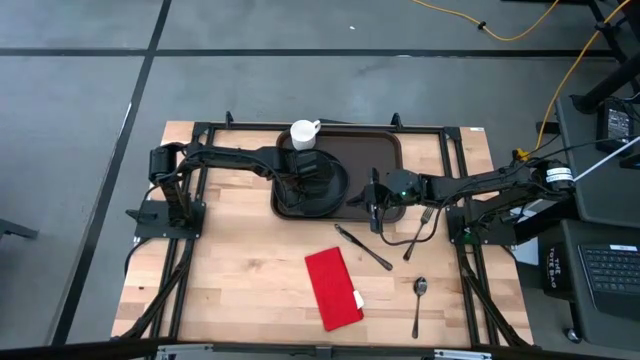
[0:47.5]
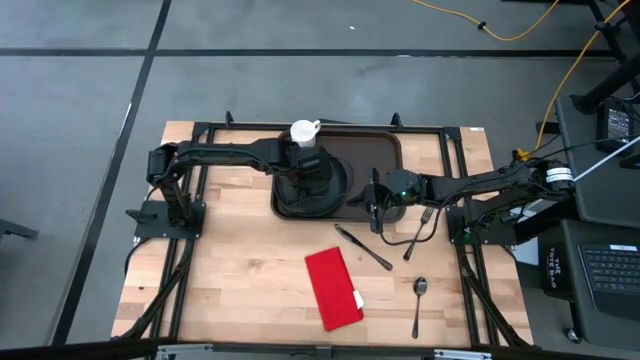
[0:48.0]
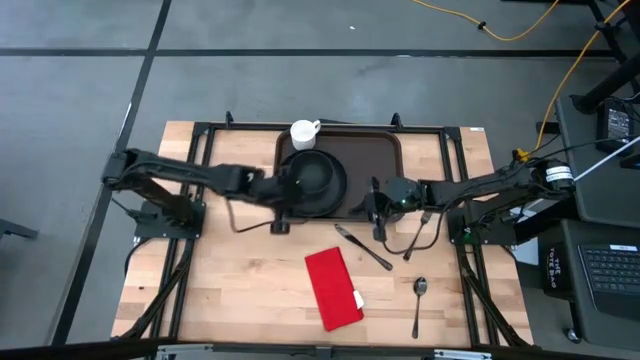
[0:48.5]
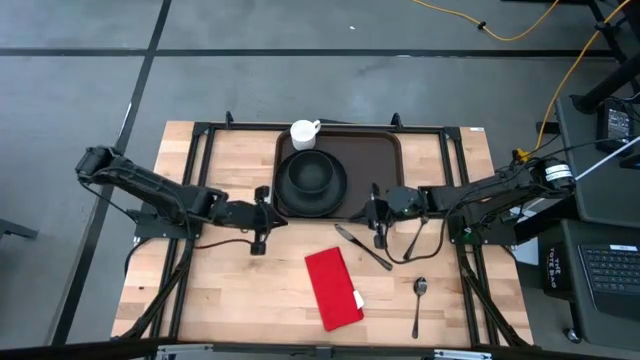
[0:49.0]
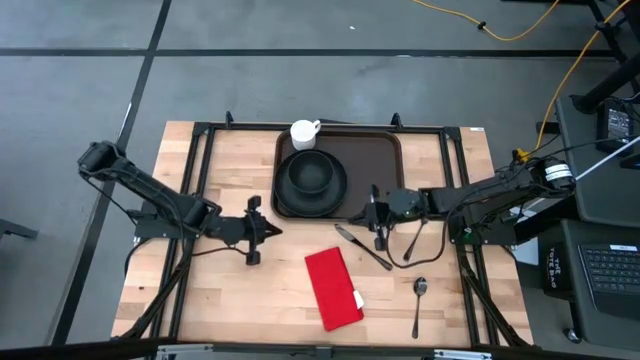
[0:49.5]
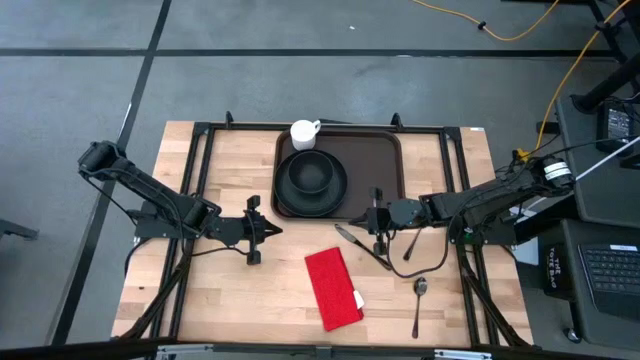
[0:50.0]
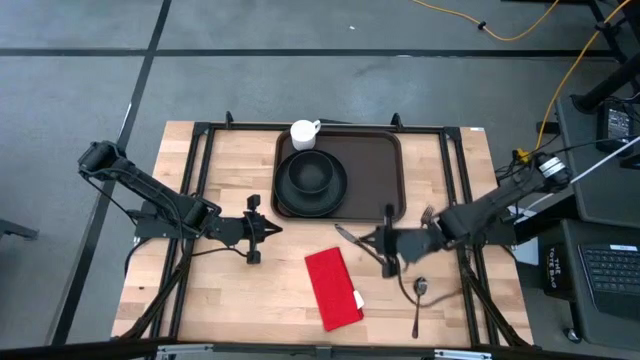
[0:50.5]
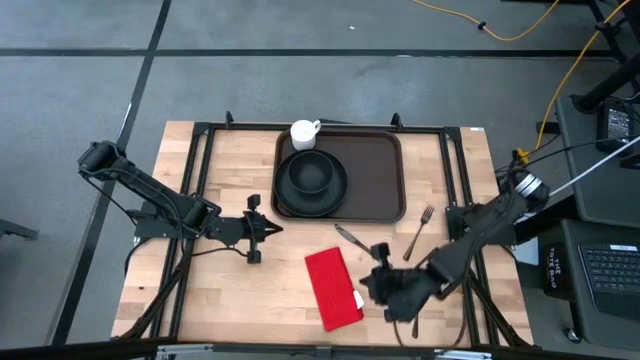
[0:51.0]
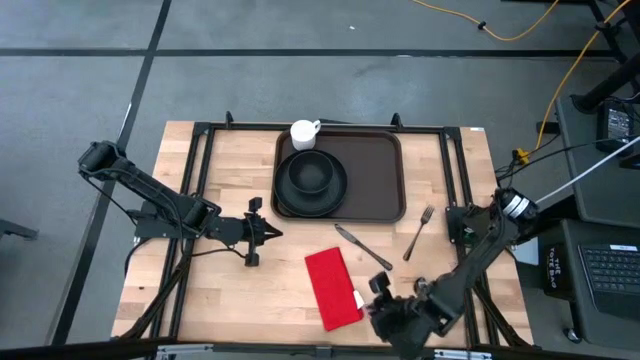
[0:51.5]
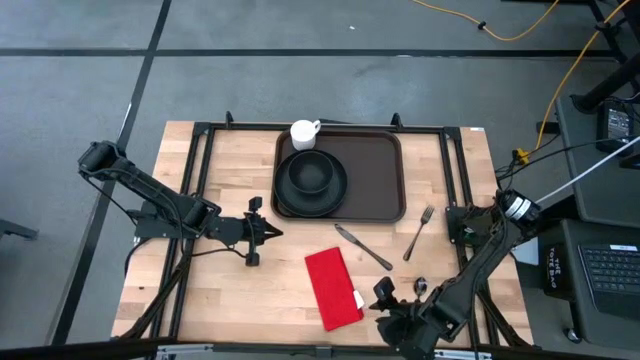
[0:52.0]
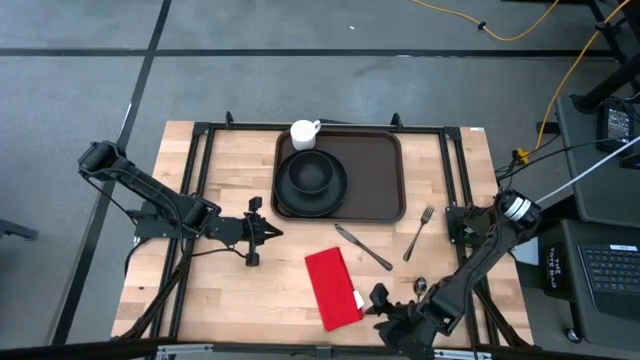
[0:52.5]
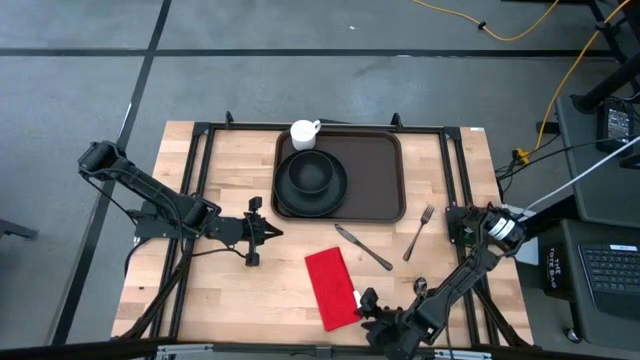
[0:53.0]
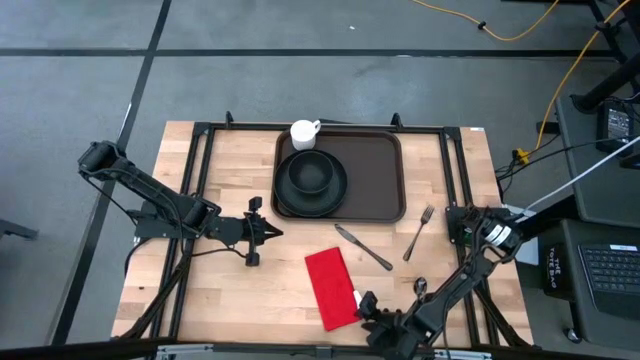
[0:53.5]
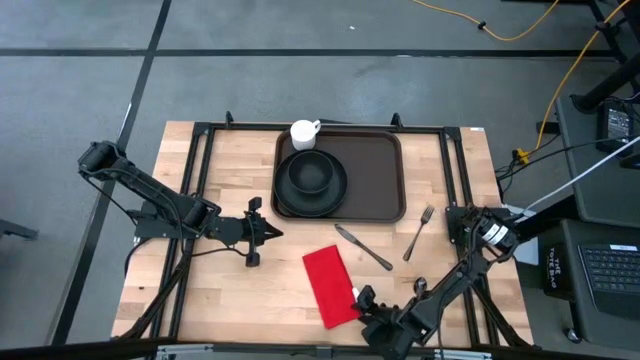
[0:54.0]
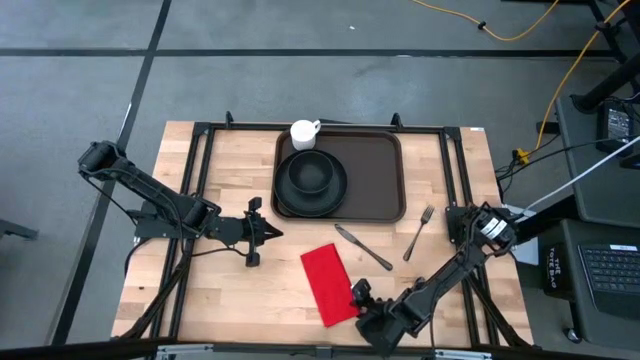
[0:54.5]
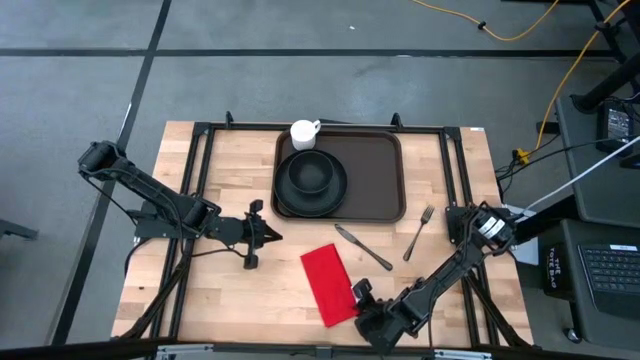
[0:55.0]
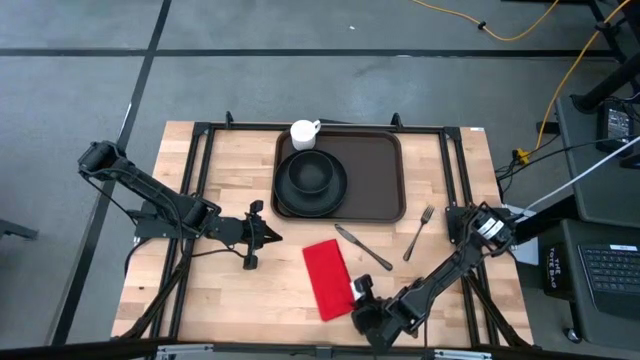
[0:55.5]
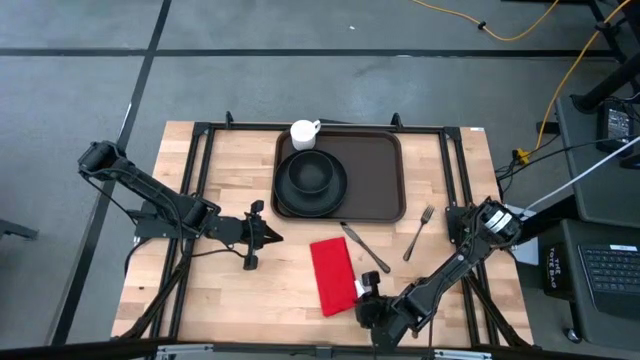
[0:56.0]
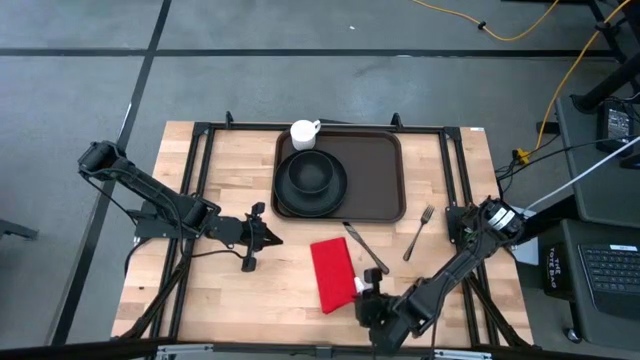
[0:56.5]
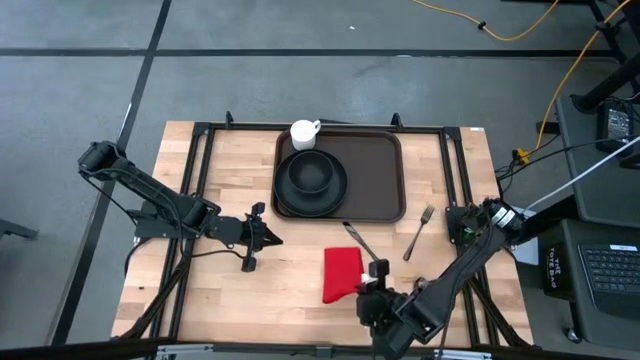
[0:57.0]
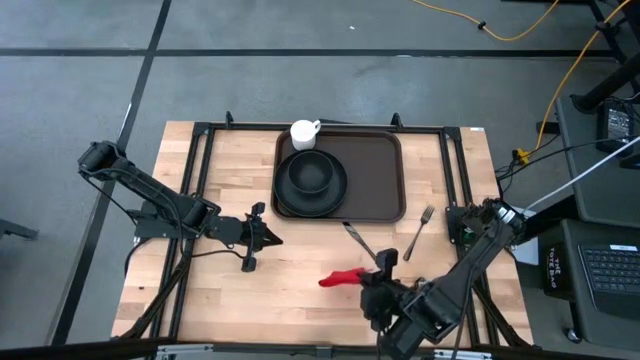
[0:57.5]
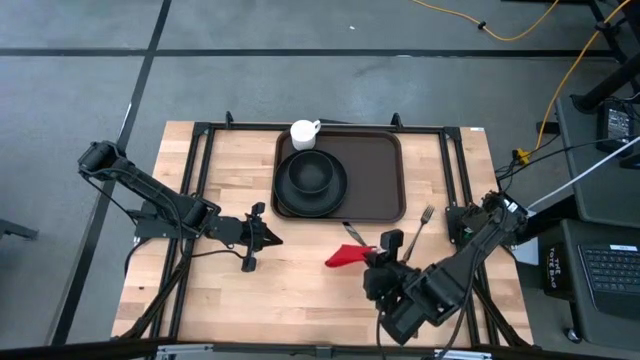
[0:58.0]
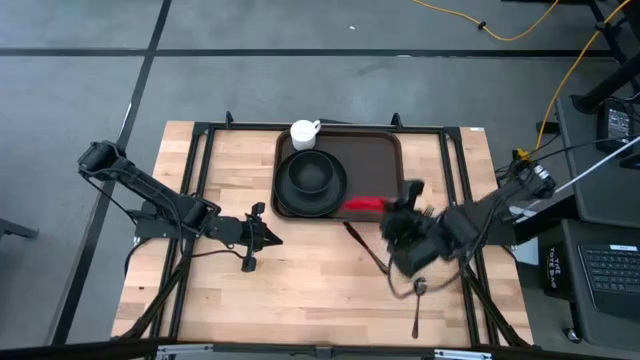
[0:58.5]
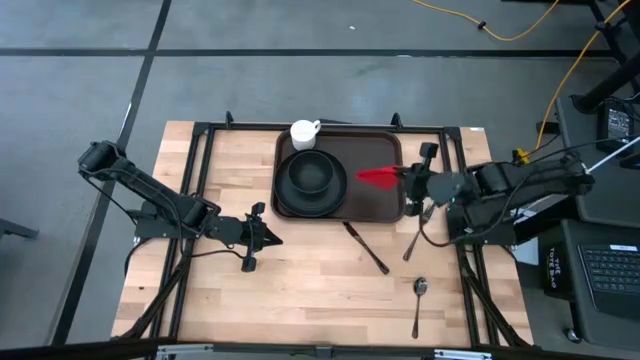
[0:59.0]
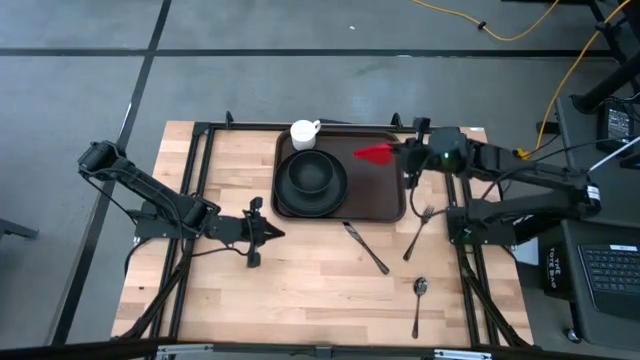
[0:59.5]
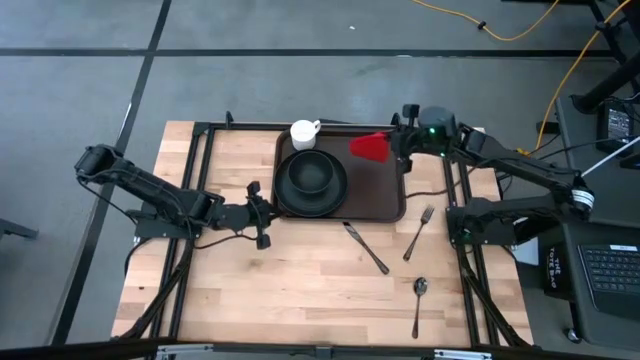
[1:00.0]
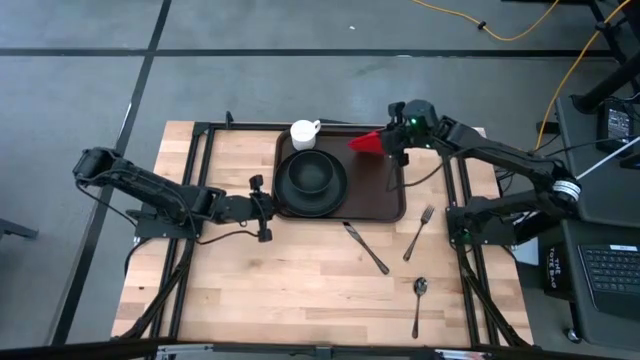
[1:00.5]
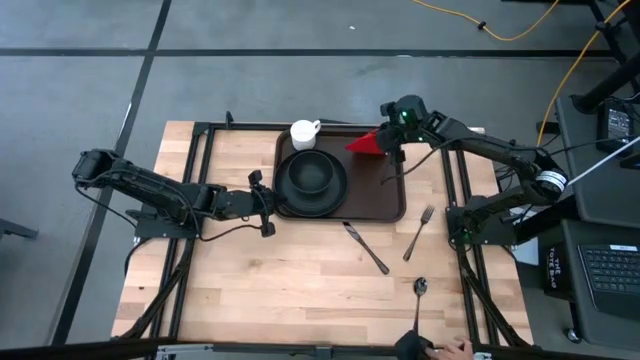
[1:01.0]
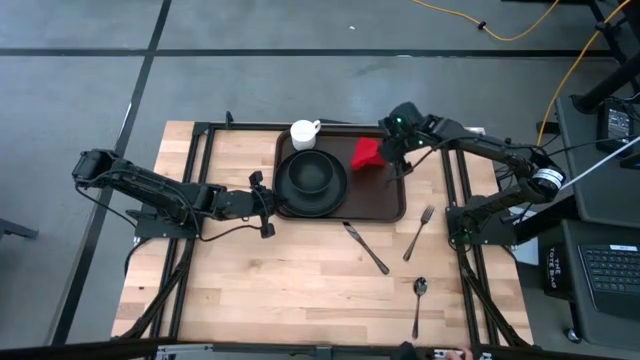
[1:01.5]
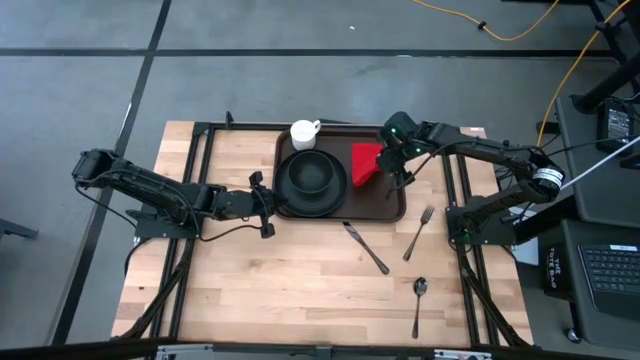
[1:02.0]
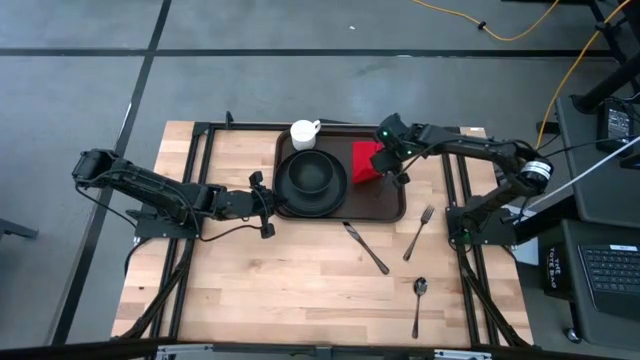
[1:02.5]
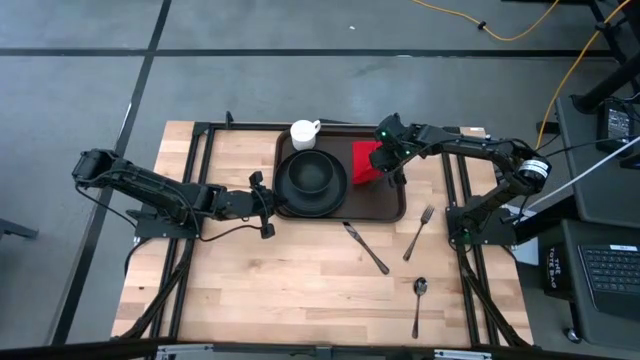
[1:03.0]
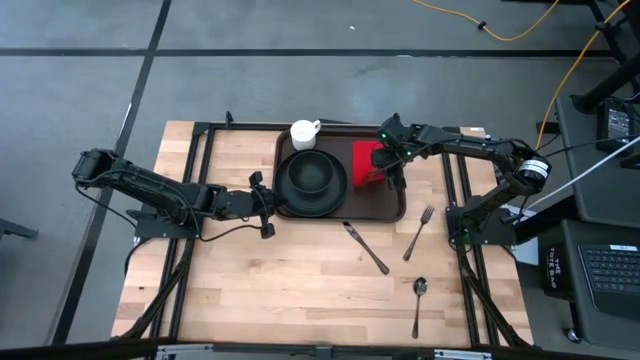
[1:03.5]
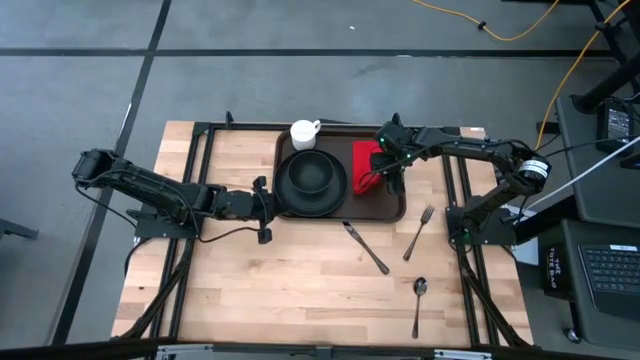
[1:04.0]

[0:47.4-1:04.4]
Task: Set up tray
Put the red napkin on the brown serving tray to the right of the black plate

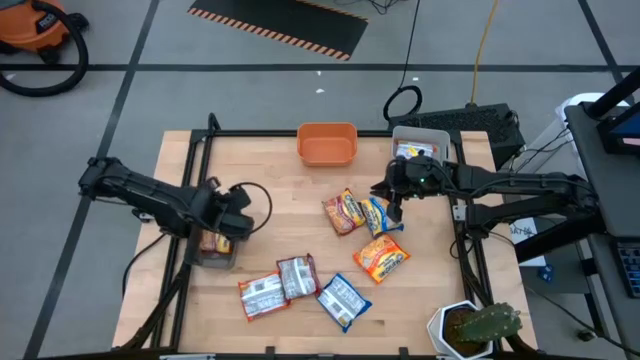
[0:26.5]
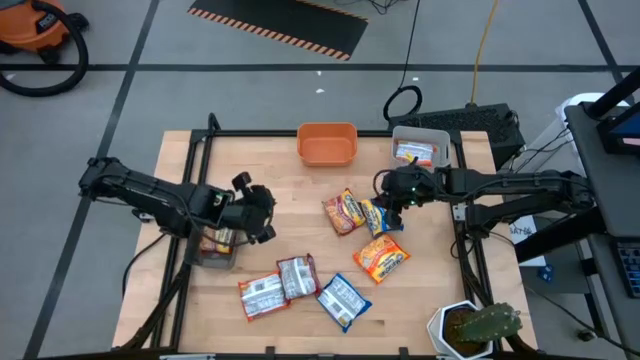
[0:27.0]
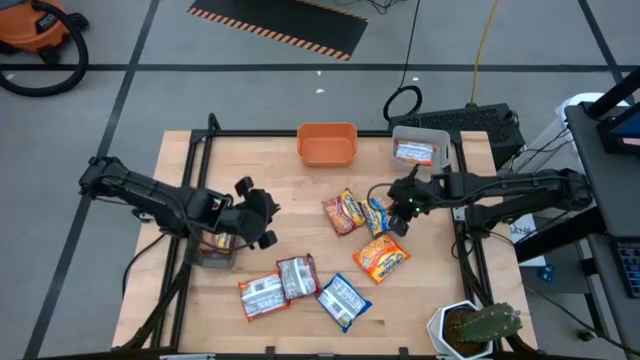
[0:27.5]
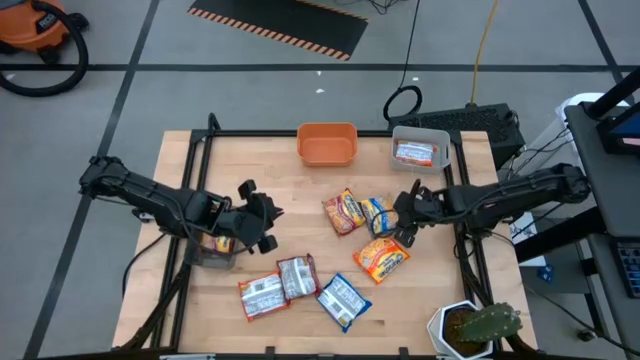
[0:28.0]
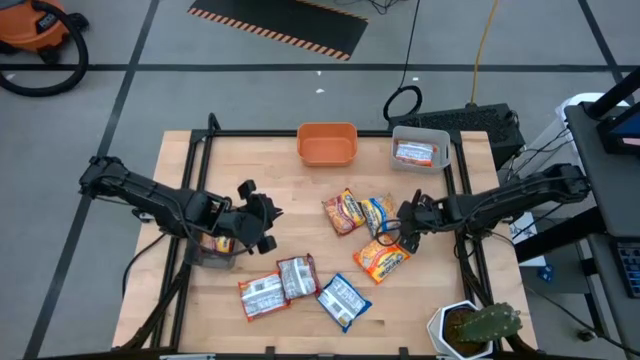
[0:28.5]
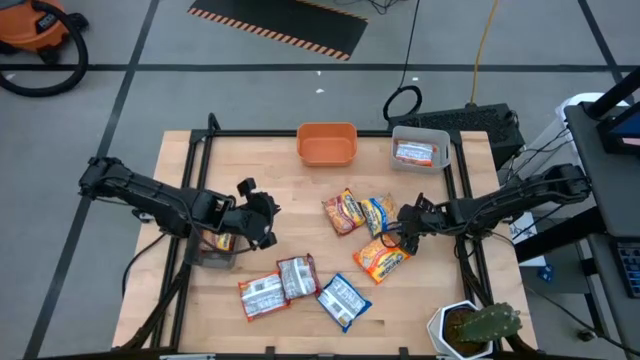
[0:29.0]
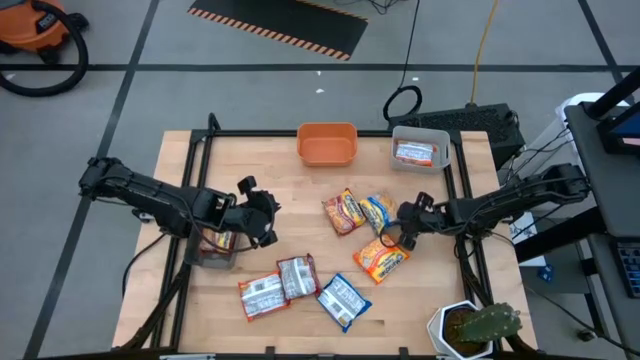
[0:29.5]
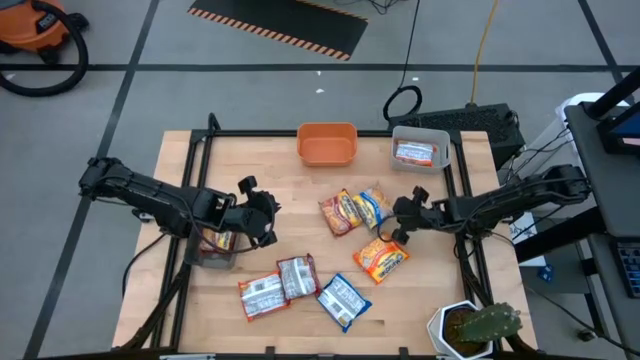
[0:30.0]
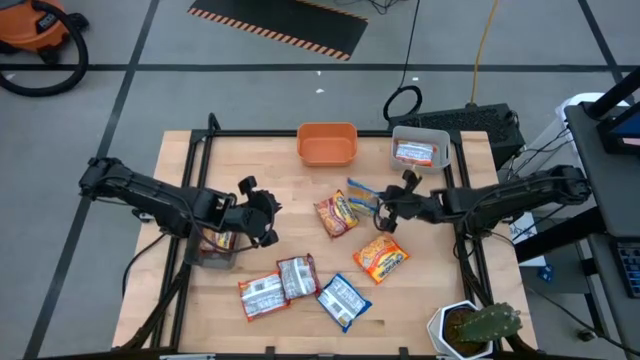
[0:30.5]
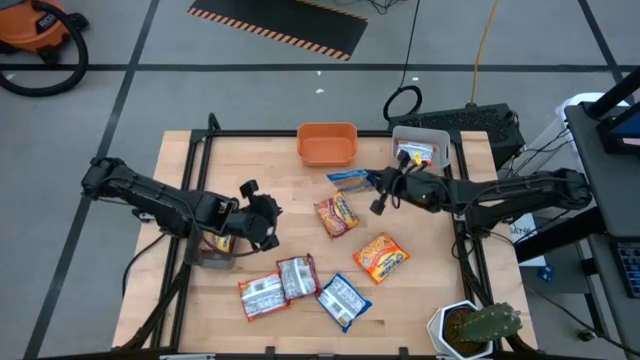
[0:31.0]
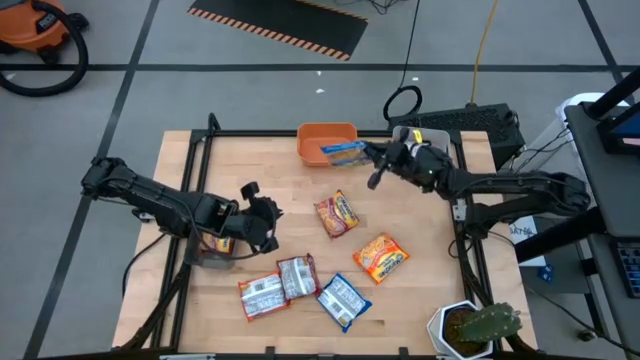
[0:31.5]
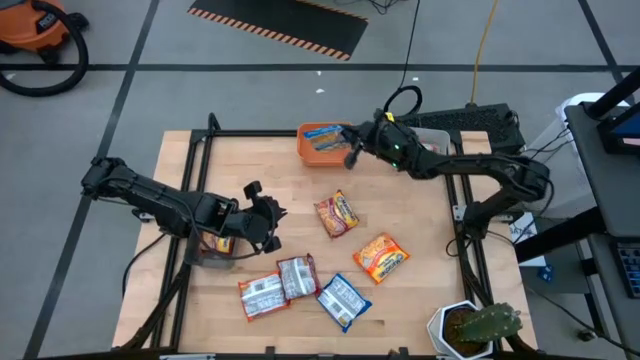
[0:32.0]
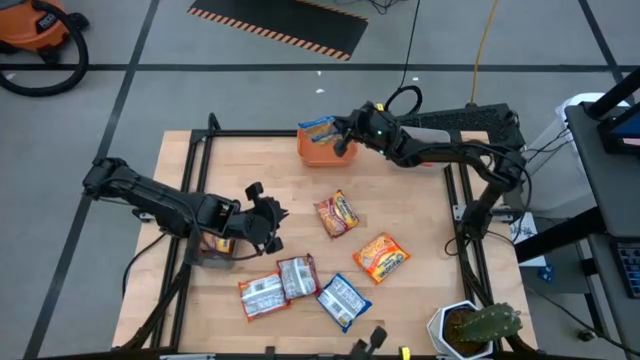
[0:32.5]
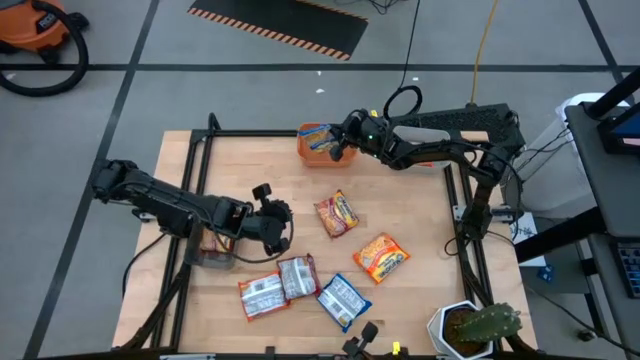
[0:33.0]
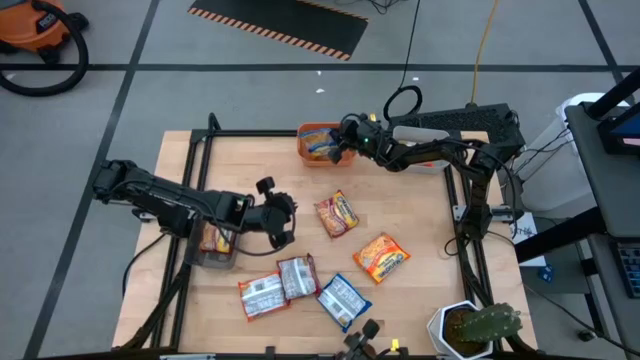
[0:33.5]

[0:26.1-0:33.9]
Task: Sort Maruchan noodles
Put the top blue noodle pack into the orange bin
